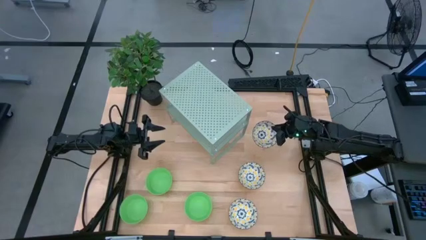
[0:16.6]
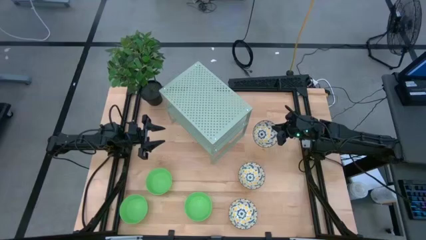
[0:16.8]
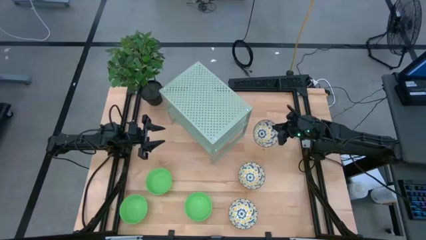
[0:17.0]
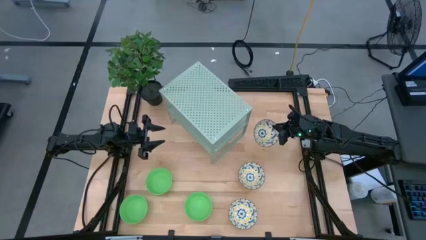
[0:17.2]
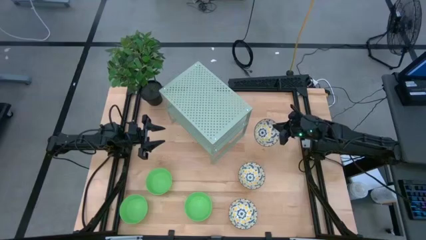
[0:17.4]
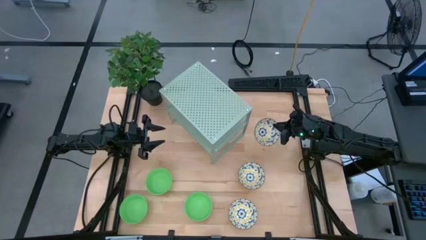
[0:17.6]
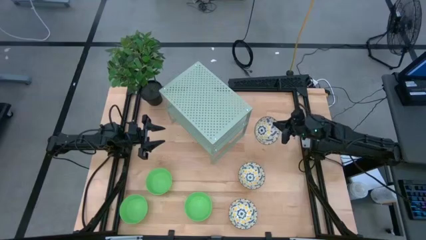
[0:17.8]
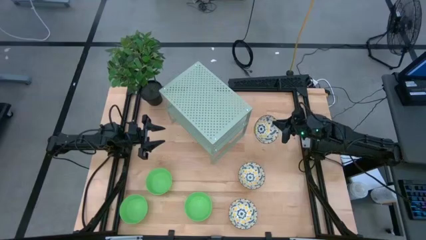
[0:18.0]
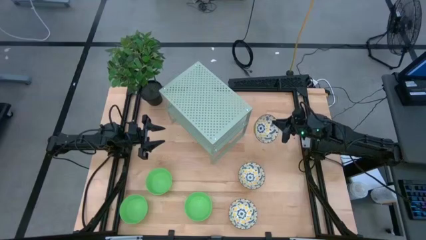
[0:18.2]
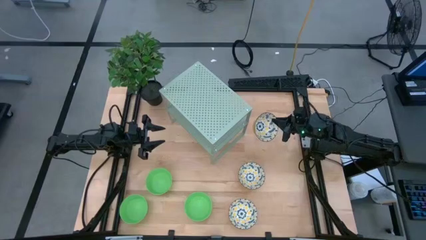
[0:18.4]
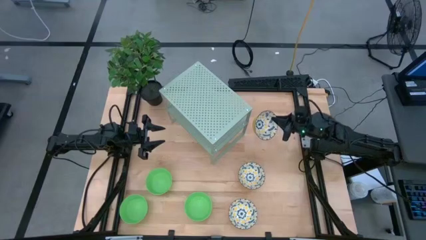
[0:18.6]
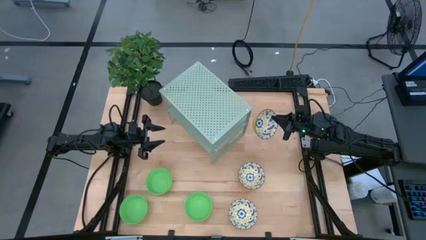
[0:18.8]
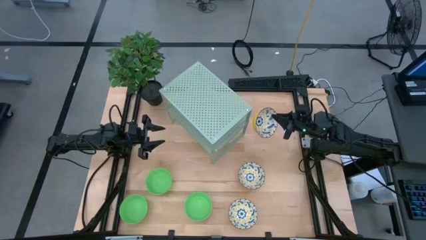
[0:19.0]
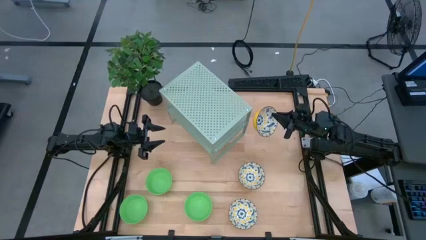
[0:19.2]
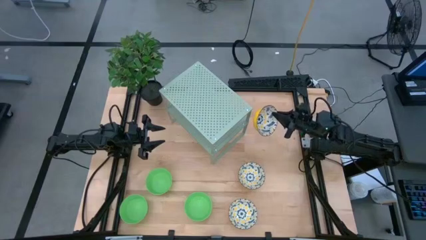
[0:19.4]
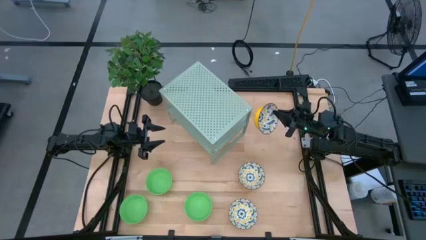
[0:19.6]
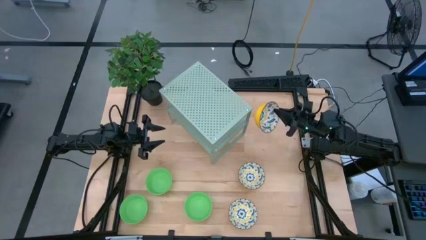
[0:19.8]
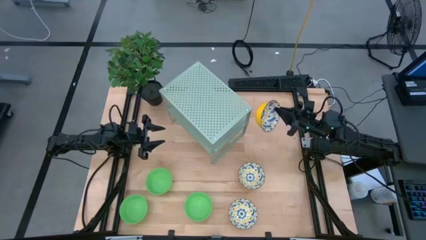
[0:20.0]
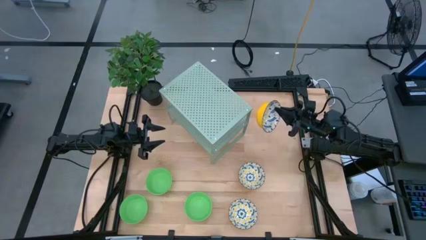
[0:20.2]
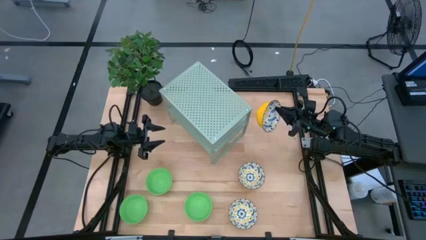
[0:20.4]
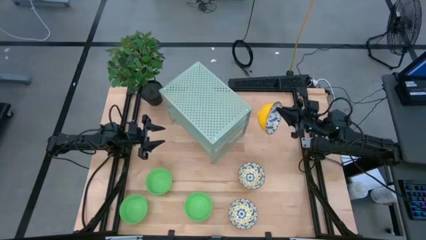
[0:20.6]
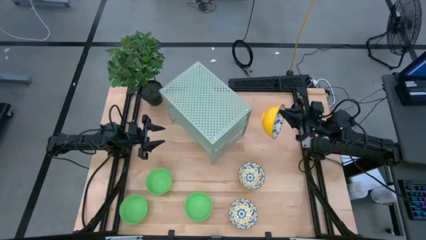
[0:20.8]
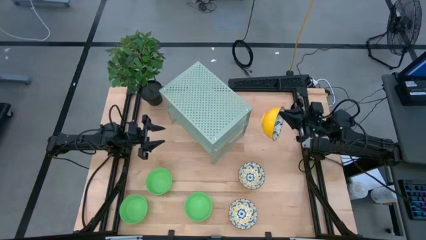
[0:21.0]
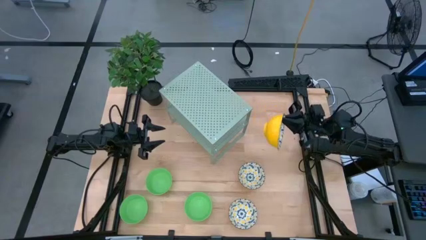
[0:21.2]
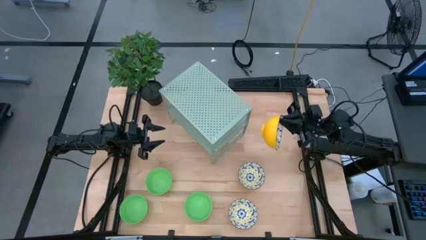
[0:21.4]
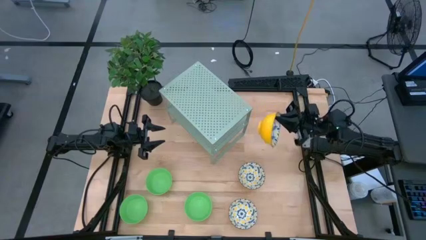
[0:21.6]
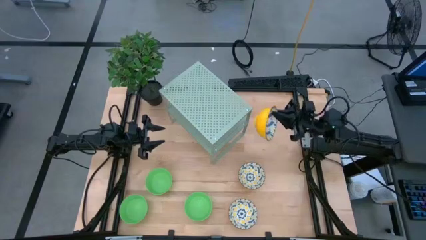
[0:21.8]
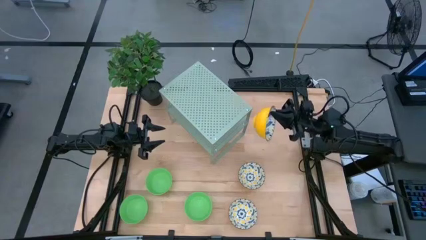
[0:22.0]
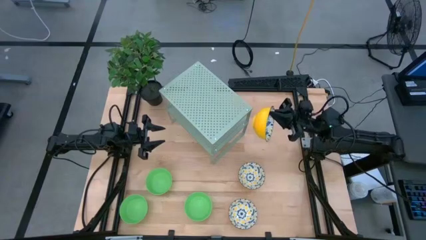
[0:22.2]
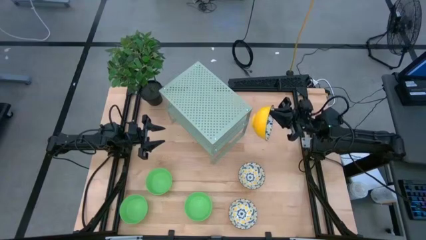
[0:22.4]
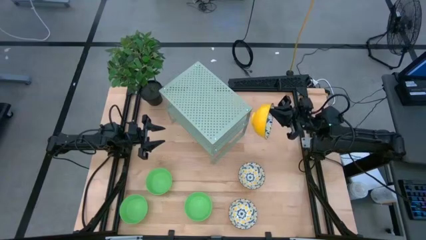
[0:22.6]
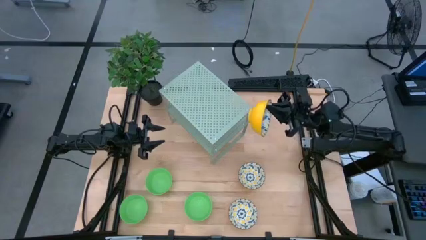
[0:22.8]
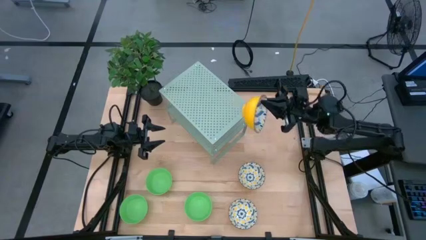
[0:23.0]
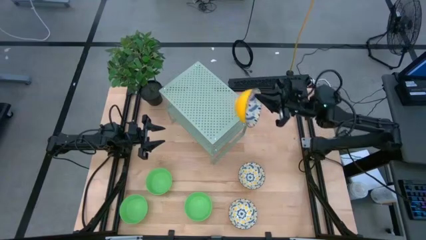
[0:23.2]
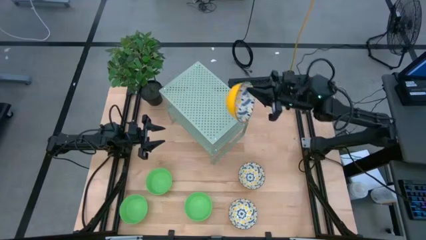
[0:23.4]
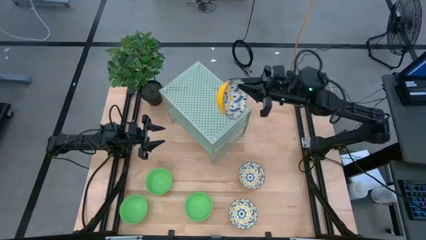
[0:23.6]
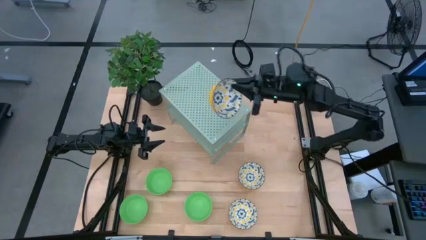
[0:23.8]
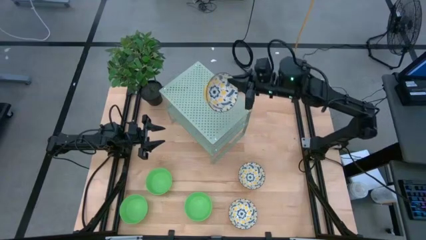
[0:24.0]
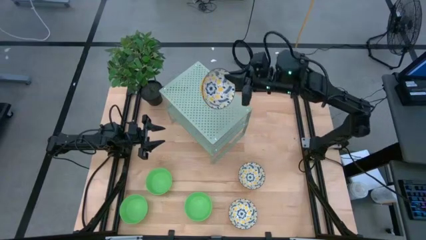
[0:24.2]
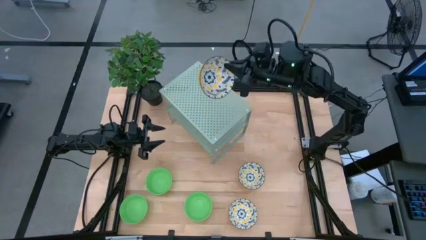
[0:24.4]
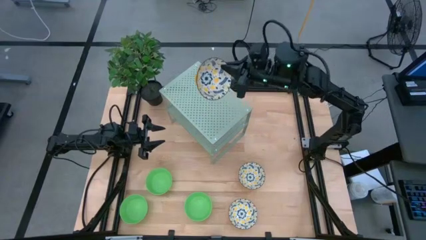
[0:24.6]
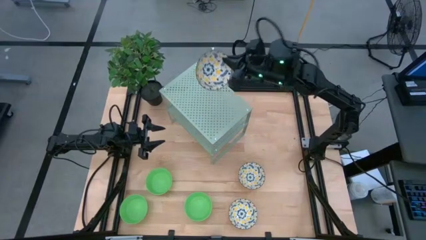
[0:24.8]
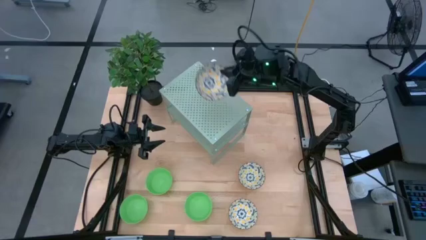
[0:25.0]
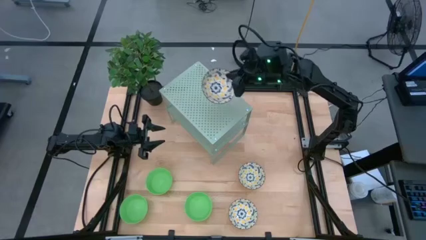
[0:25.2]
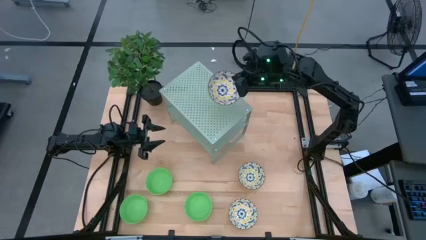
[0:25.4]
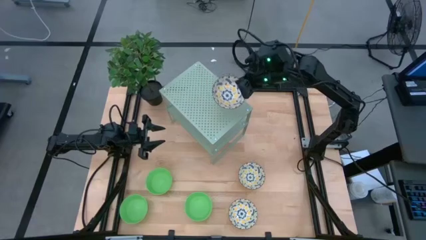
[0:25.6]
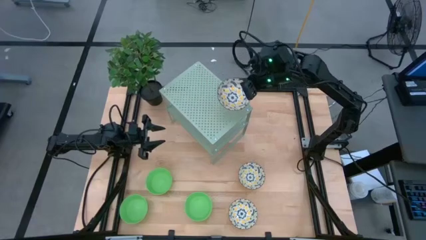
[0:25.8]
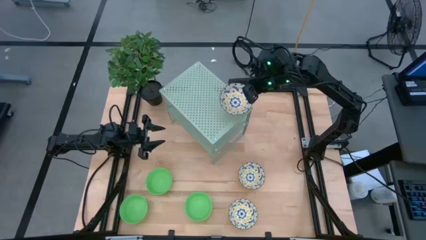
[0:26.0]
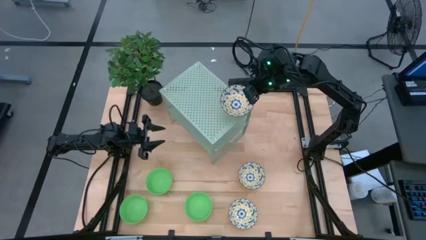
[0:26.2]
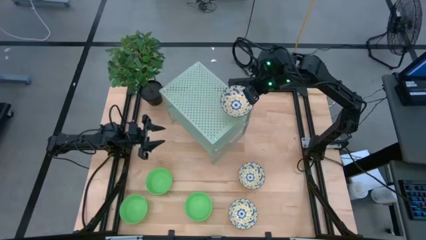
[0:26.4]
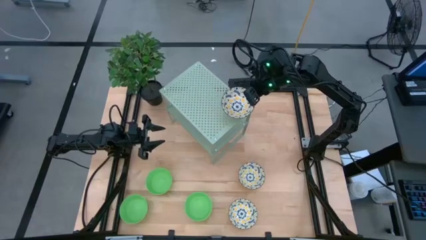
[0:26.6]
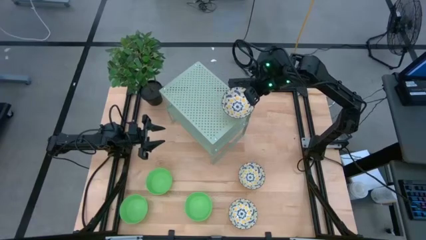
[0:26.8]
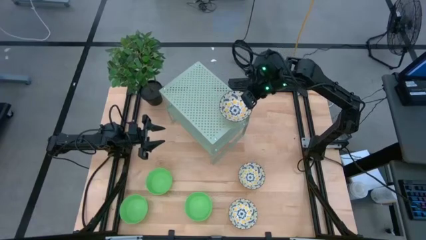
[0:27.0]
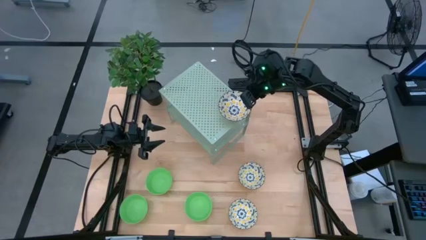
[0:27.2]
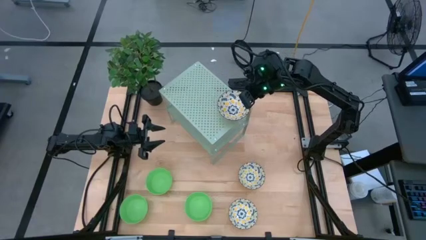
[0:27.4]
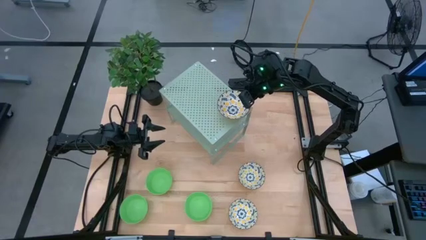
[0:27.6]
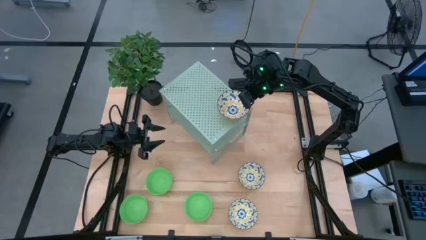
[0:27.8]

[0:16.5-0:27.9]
Task: Pick & Place Mini bowls
Put the top yellow patterned bowl on the shelf

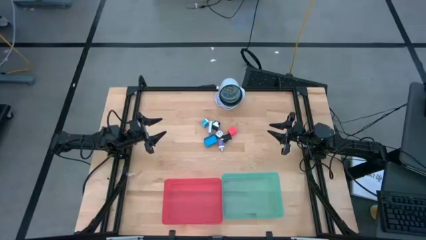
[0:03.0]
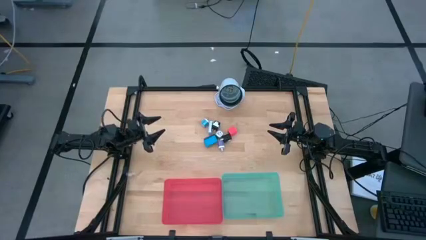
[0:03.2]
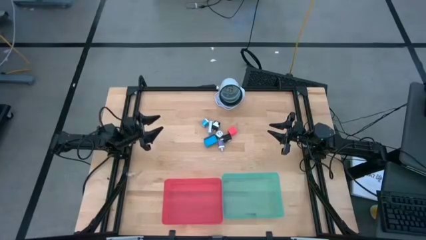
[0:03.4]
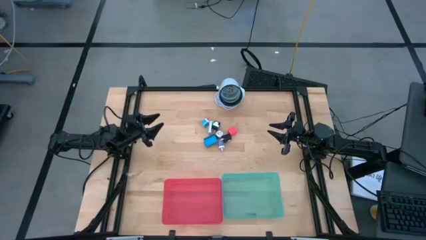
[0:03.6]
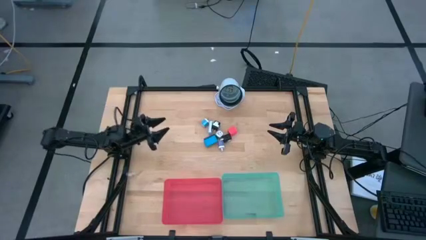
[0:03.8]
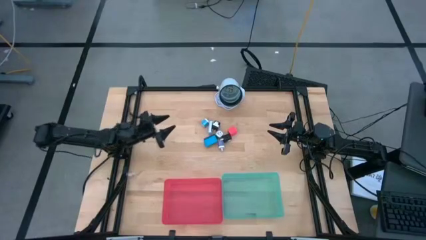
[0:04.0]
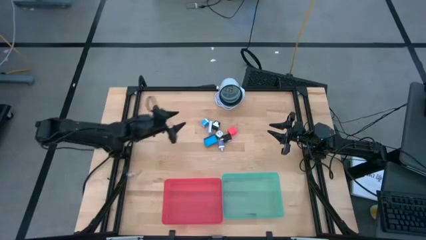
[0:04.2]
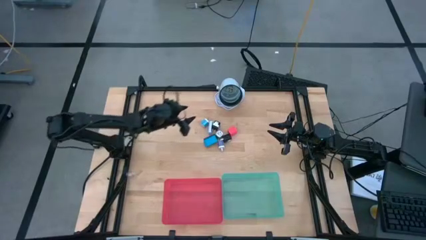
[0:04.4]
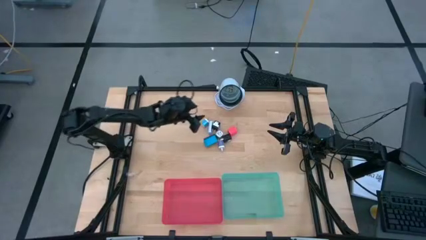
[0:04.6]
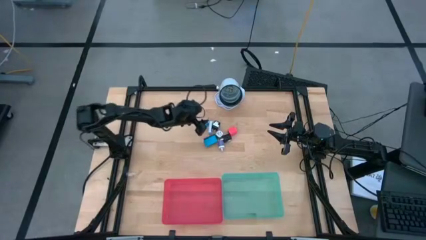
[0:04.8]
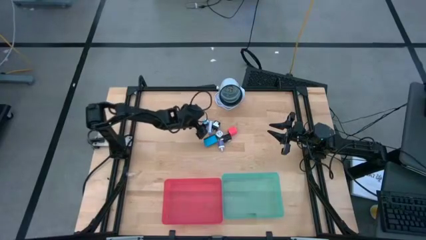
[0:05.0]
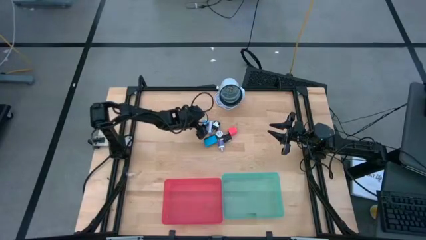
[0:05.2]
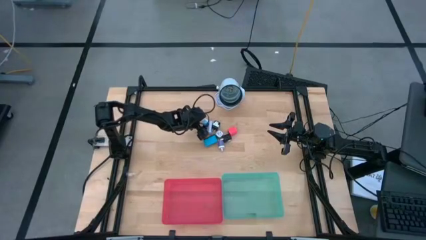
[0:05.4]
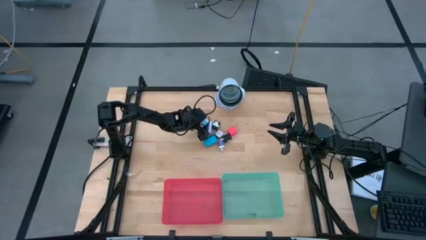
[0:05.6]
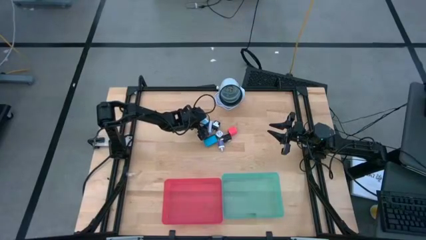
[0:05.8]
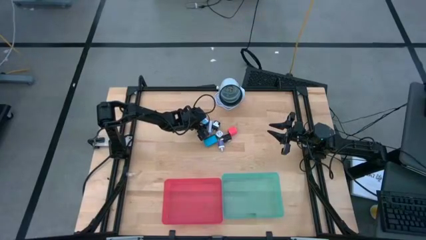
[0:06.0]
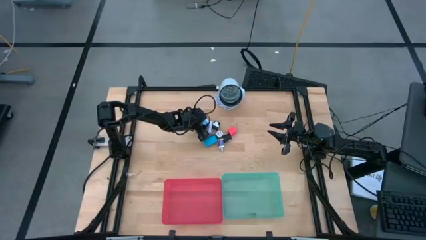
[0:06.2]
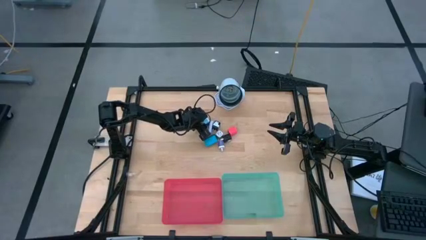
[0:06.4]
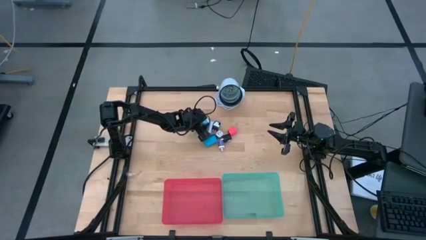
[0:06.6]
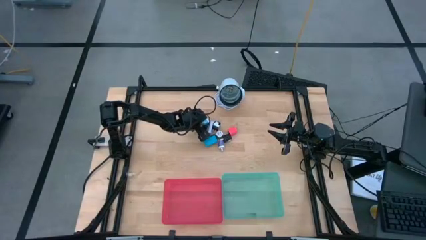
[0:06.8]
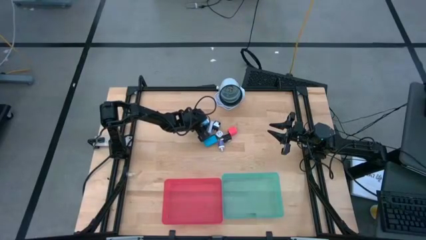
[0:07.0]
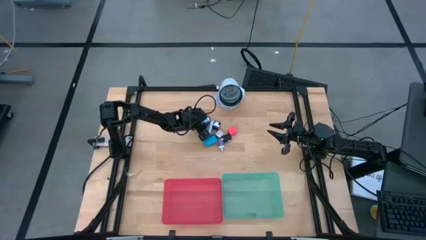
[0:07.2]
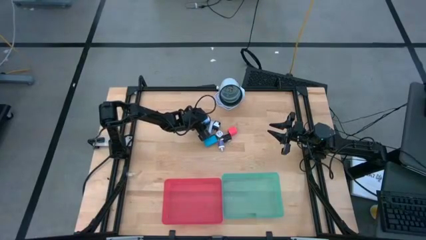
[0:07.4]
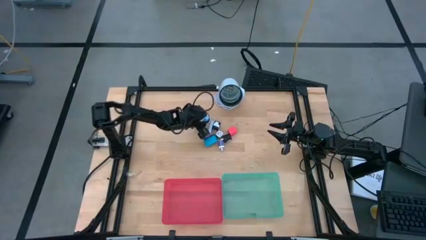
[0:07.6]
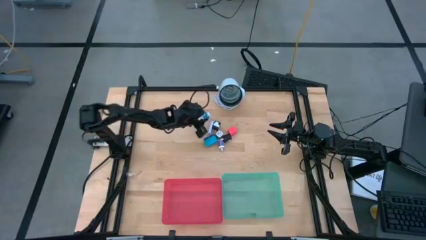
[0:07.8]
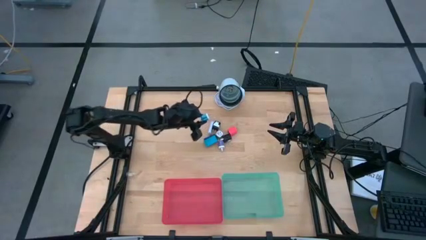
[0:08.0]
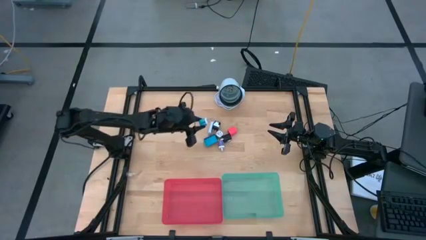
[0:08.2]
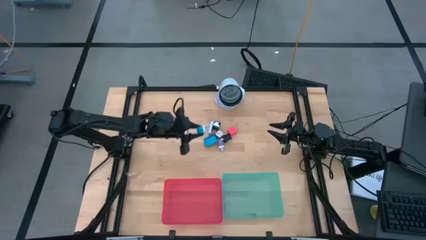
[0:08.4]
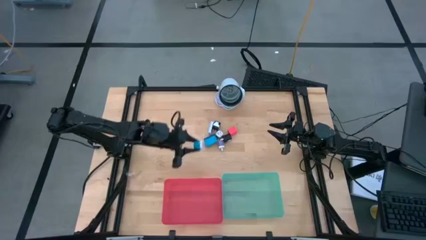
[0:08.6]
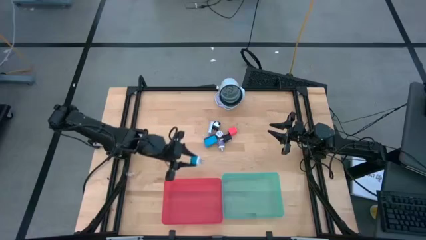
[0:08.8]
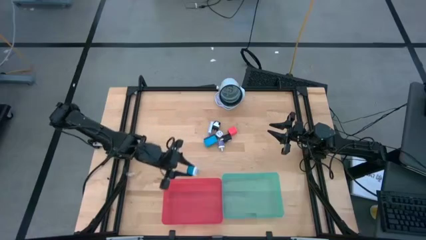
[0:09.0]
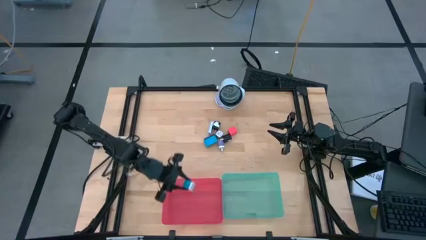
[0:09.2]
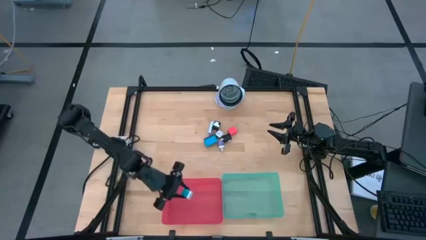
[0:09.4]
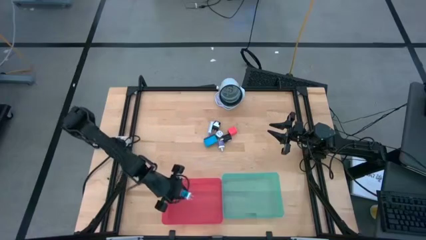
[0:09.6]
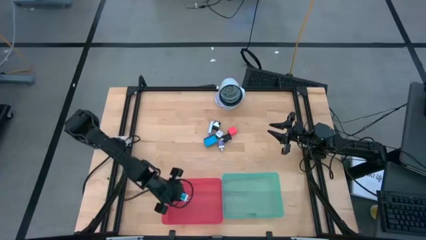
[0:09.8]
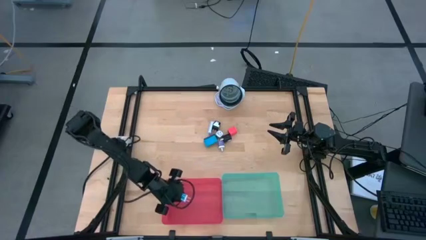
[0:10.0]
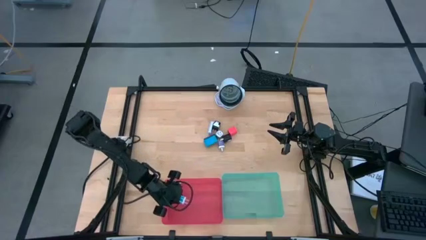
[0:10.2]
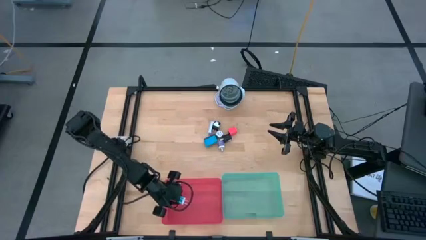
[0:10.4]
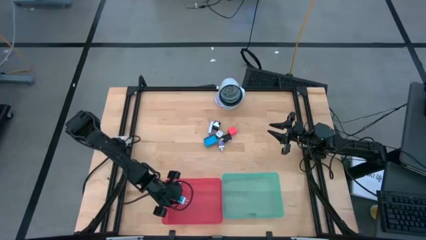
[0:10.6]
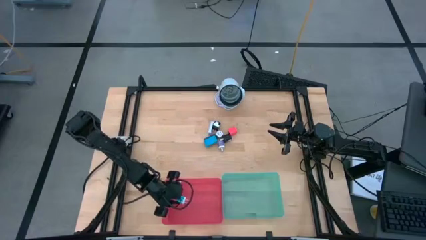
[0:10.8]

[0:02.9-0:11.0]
Task: Pick & Place Office items
Put the blue charger adapter into the red bin
